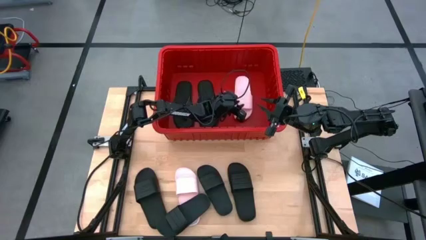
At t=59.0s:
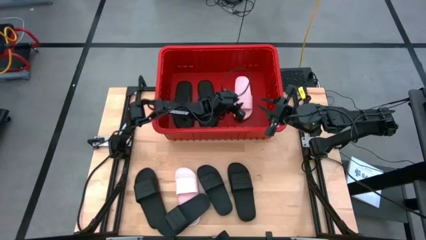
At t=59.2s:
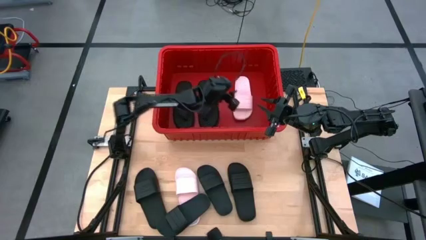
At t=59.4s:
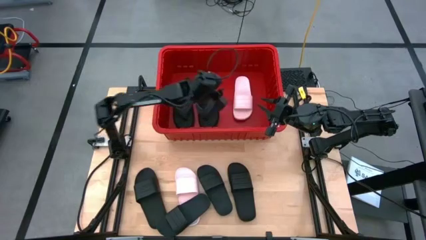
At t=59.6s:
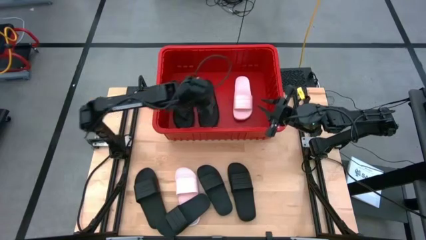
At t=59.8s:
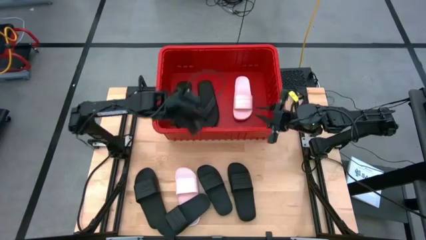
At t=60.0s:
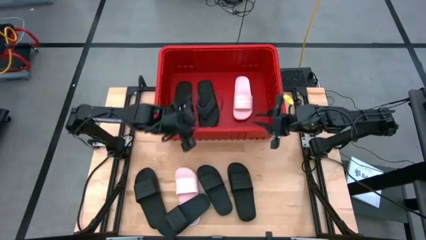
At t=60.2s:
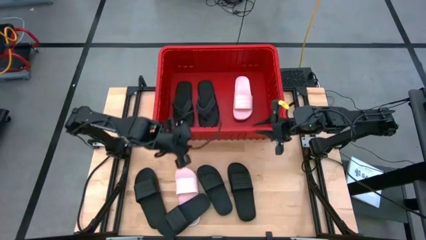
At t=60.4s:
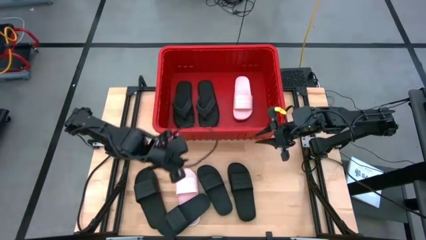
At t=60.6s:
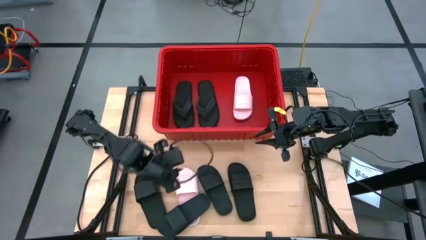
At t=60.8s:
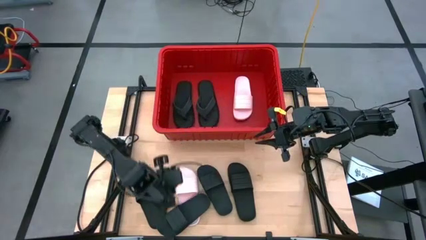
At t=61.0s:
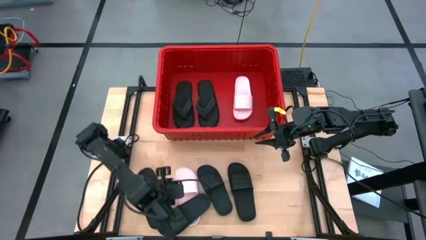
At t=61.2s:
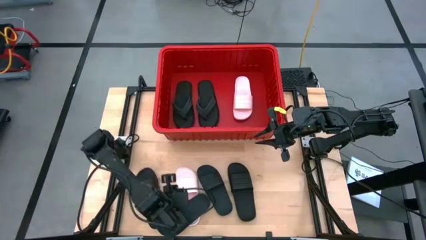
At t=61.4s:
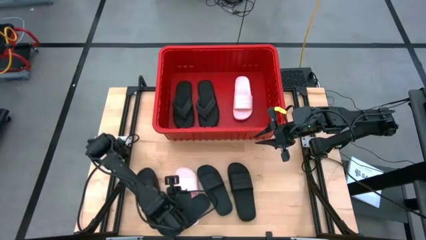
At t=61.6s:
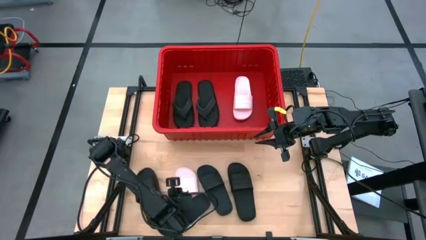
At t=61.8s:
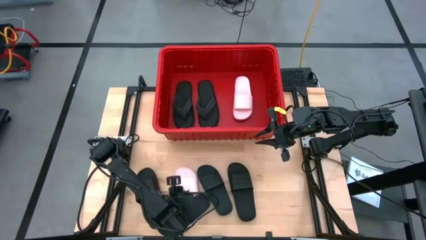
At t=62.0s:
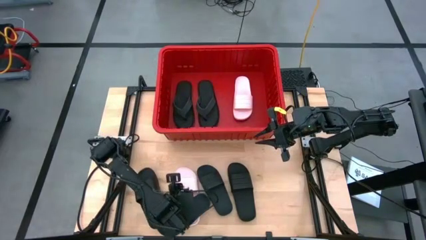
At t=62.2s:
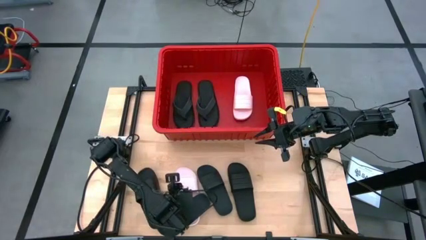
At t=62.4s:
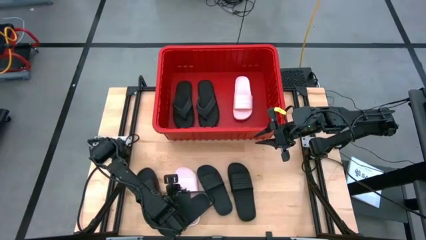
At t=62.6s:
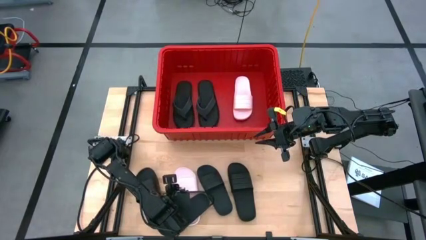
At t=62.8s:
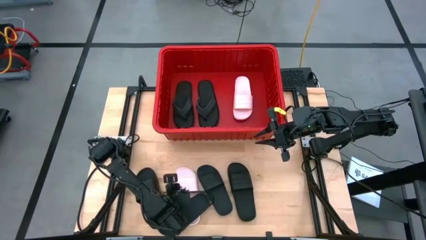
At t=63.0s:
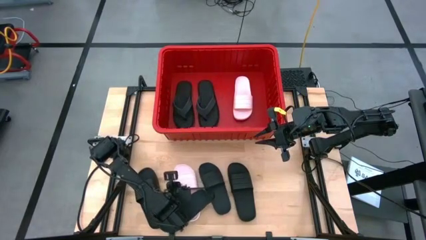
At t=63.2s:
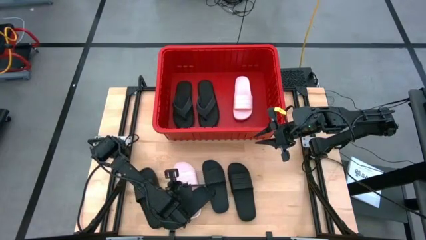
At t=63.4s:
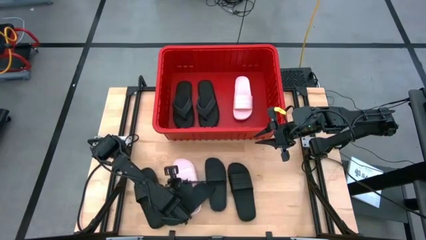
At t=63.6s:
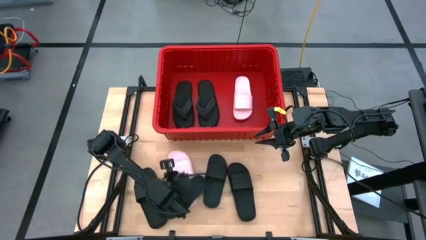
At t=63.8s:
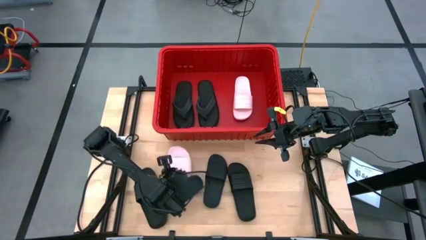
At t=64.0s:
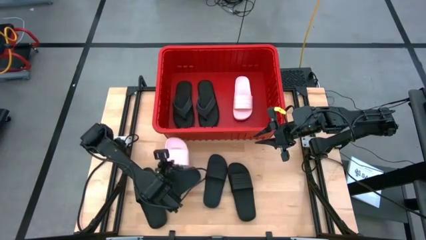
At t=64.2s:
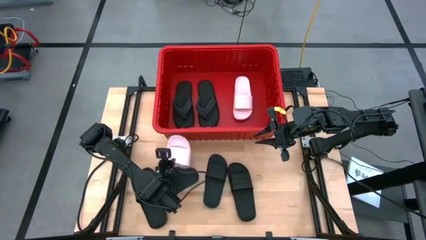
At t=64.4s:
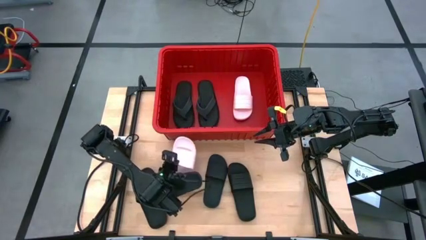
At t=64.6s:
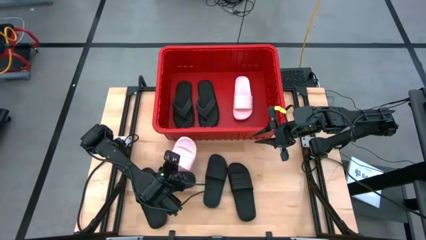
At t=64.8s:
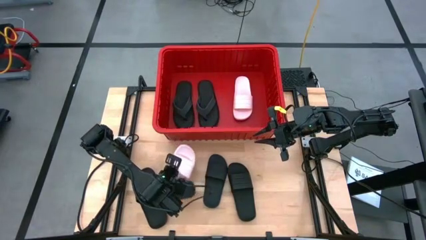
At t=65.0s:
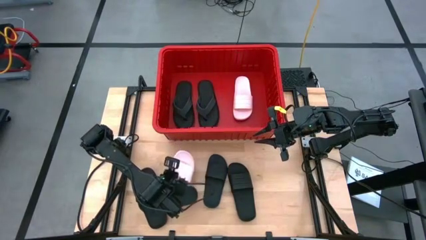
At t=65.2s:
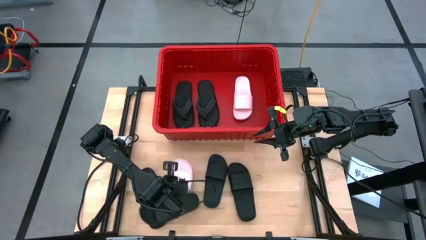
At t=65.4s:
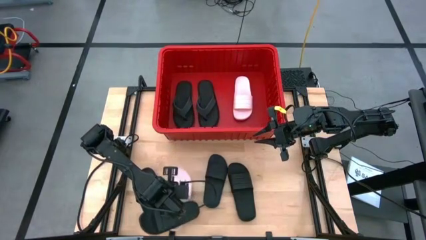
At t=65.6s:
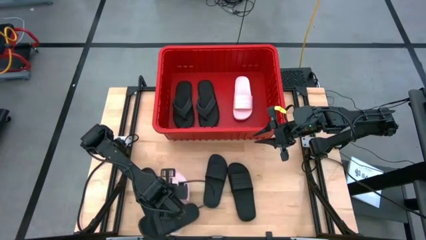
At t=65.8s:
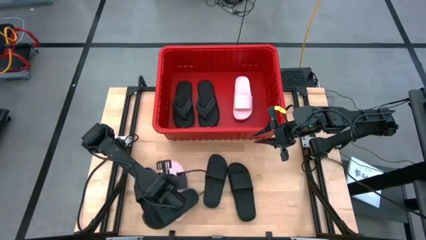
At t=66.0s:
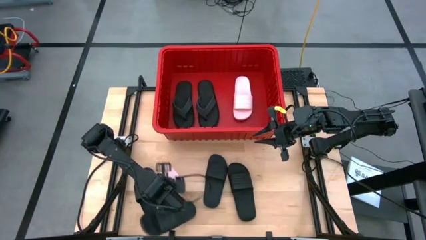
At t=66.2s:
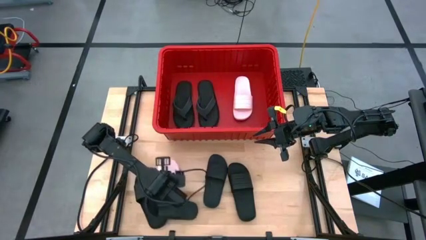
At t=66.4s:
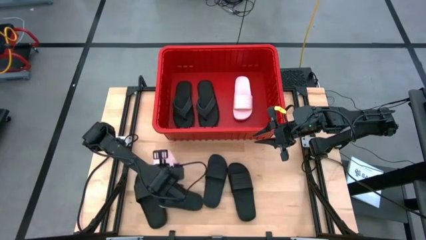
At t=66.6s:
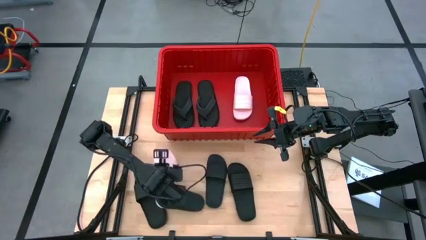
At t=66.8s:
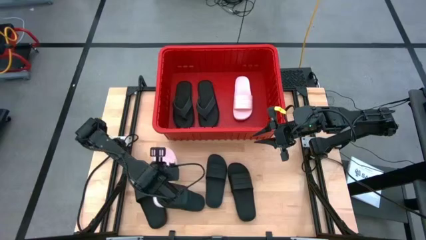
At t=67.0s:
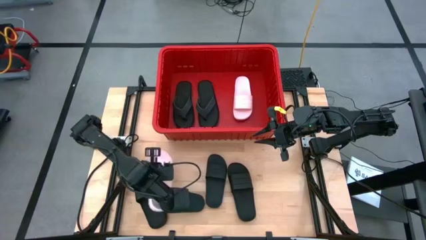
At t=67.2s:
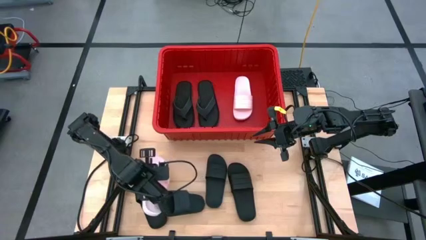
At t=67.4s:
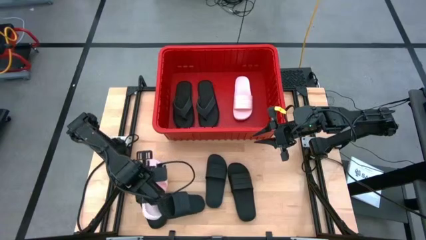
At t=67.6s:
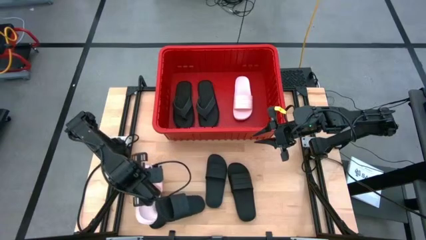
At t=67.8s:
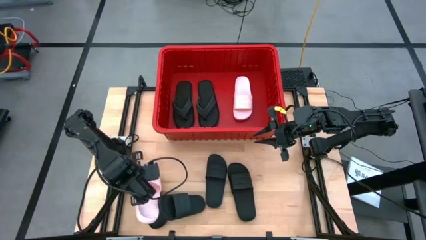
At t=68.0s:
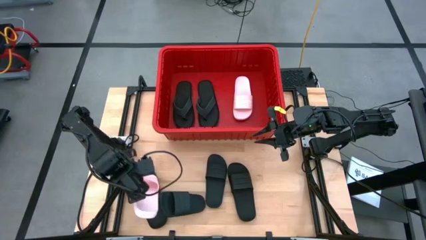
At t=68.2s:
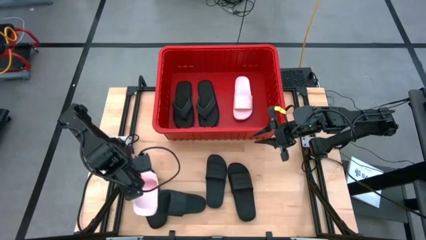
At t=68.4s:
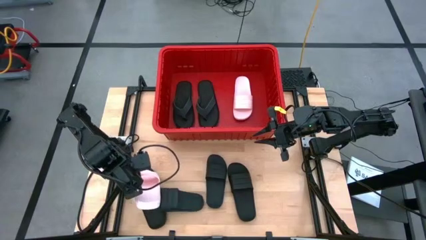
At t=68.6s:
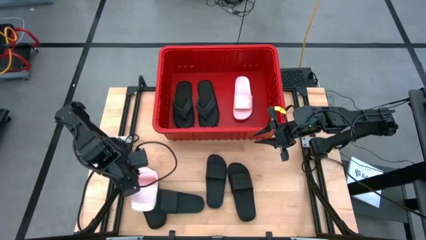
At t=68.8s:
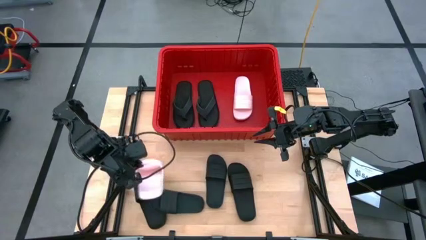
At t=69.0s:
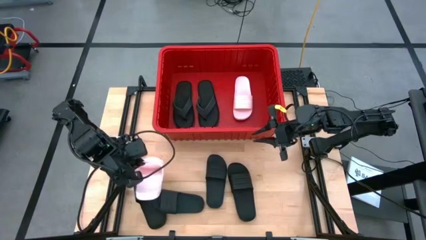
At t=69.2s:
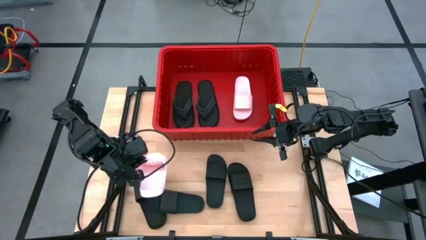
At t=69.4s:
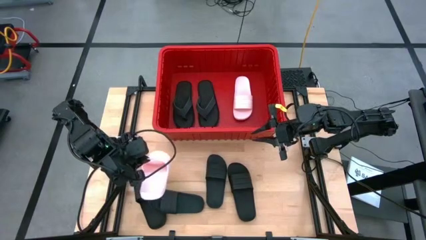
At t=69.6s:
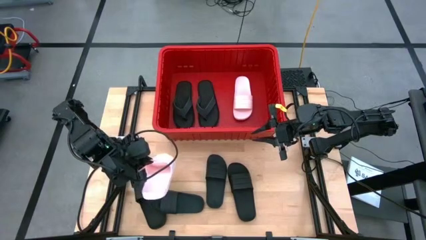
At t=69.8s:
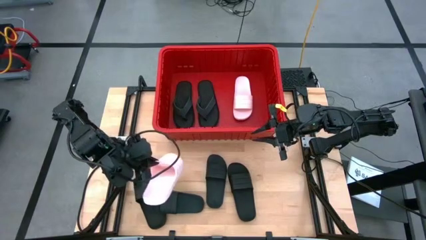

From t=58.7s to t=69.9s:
Task: Pick and place slides into bin
Put the pink slide into the red bin

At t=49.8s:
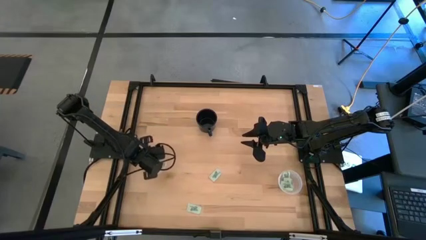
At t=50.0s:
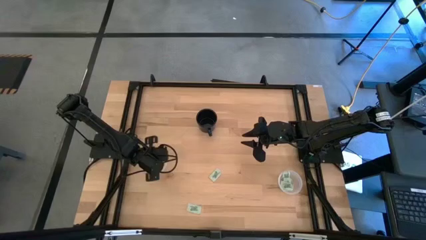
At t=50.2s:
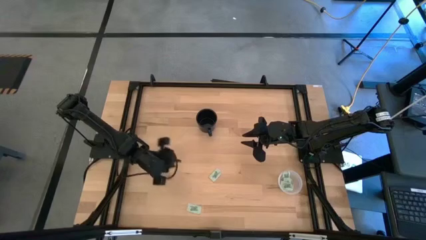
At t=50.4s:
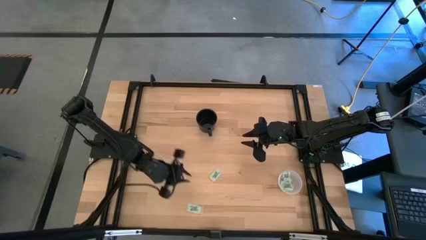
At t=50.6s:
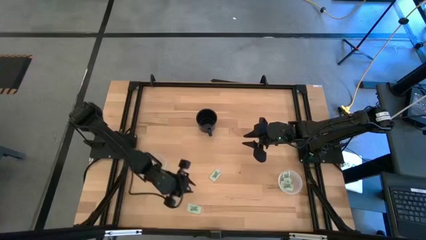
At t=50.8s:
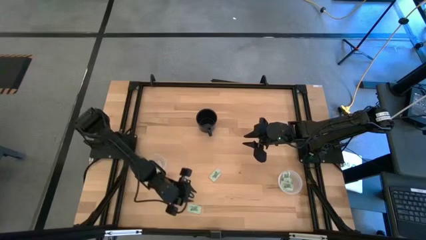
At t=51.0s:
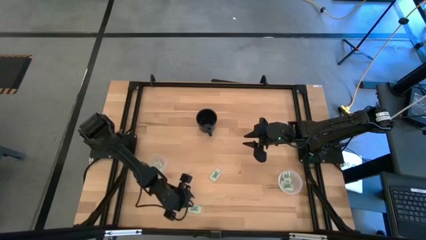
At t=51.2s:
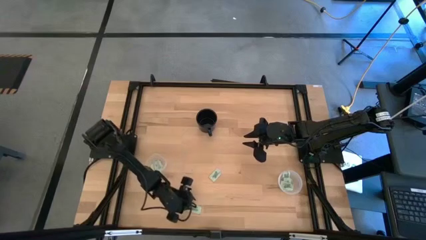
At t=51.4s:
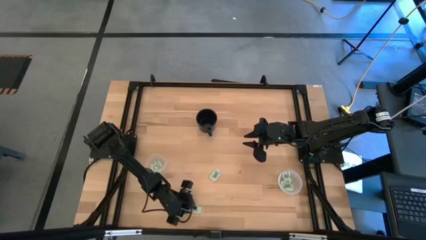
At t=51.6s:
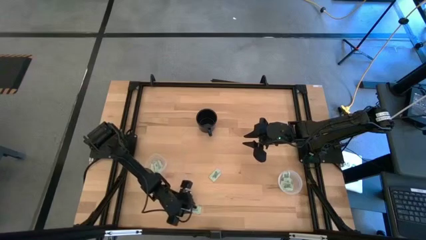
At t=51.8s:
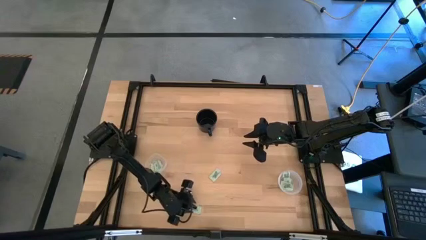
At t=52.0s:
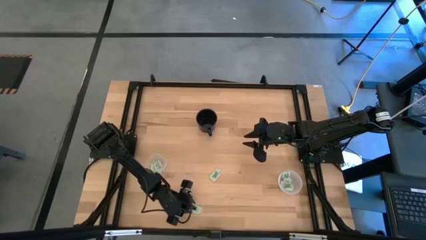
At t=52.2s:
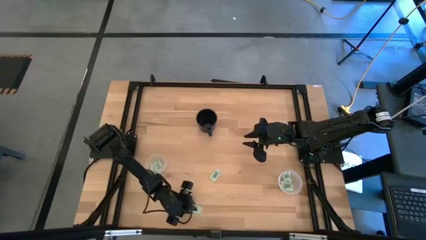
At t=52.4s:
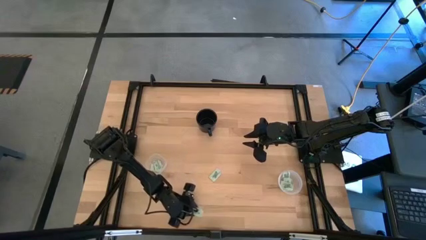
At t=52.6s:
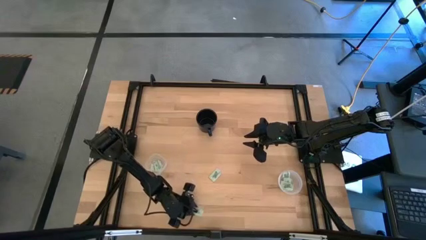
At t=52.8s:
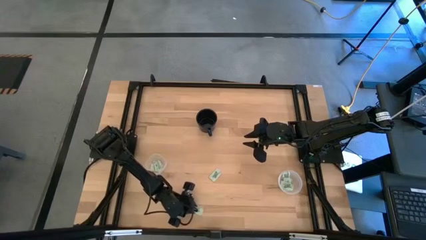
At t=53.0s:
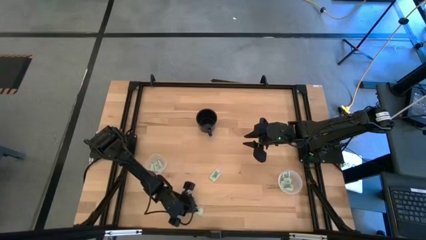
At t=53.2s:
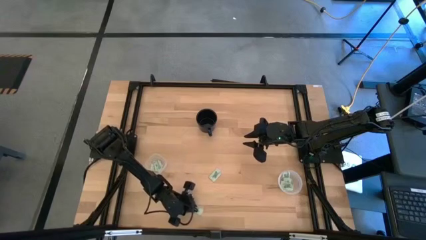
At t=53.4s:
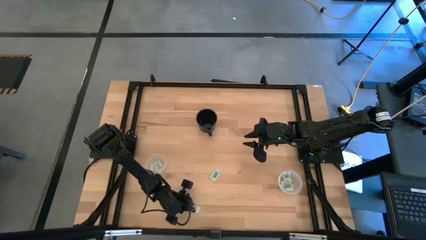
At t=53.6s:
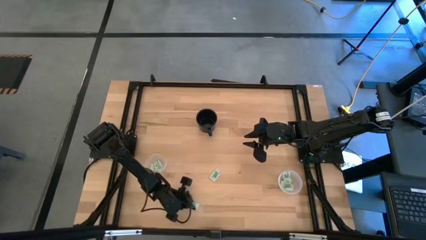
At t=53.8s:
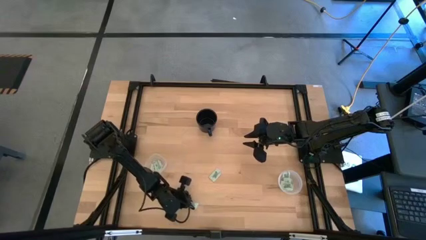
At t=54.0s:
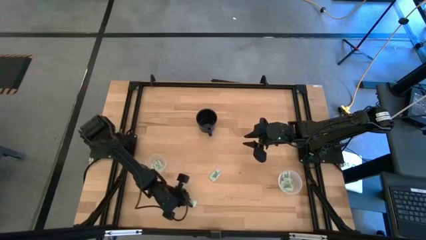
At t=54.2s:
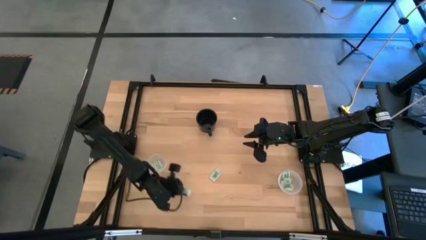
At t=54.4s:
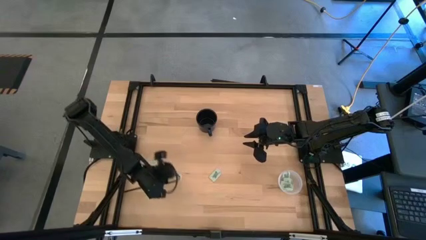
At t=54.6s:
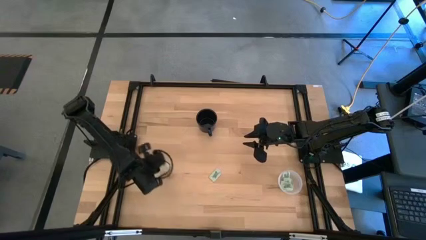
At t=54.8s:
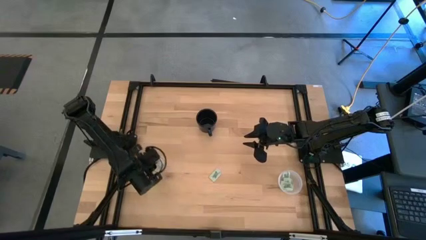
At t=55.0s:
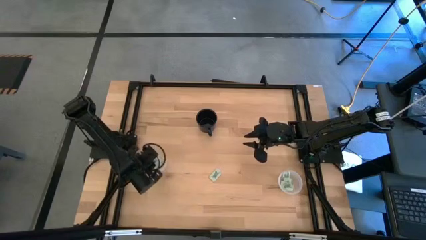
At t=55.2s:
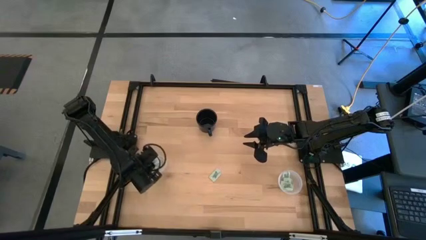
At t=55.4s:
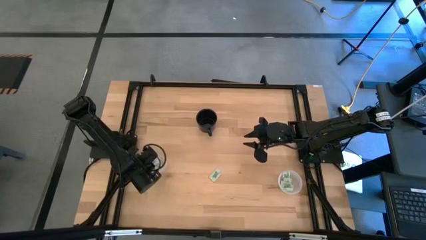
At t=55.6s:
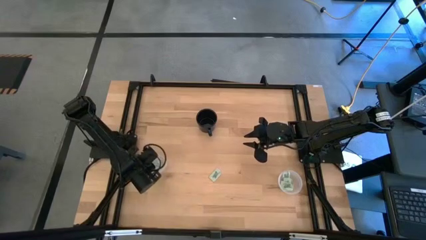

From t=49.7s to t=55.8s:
Task: Pick and place Stevia / Truvia into bins
Put the stevia packet into the left transparent container
